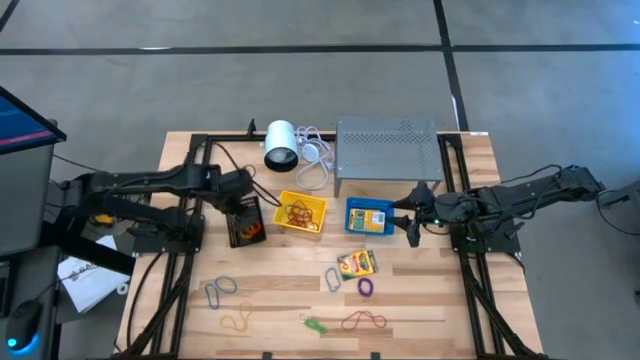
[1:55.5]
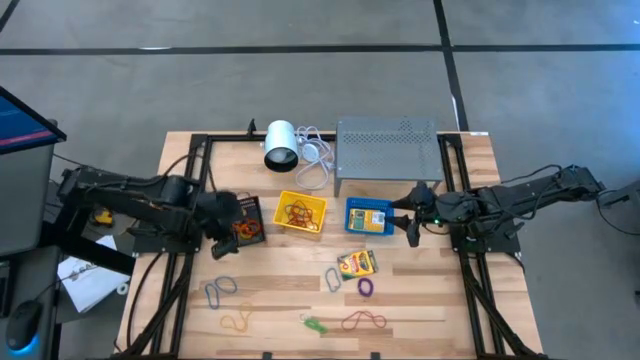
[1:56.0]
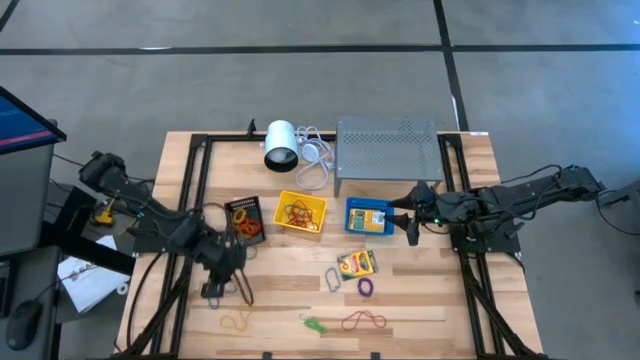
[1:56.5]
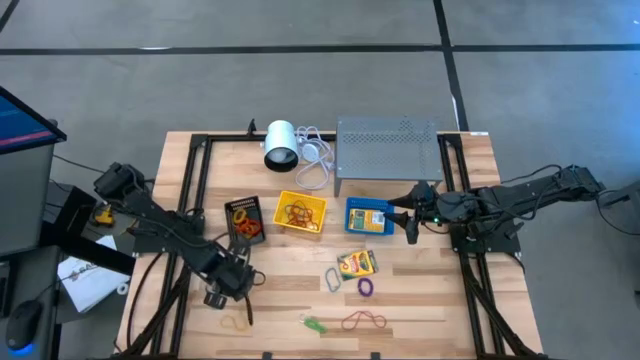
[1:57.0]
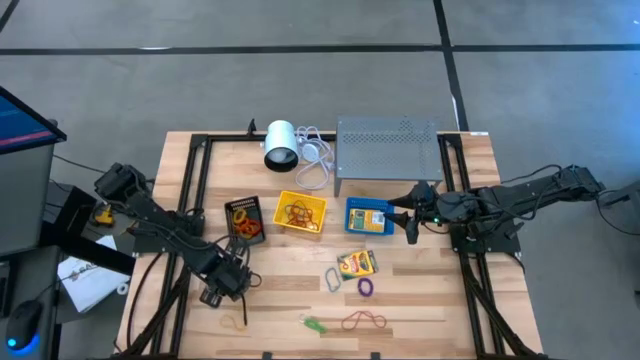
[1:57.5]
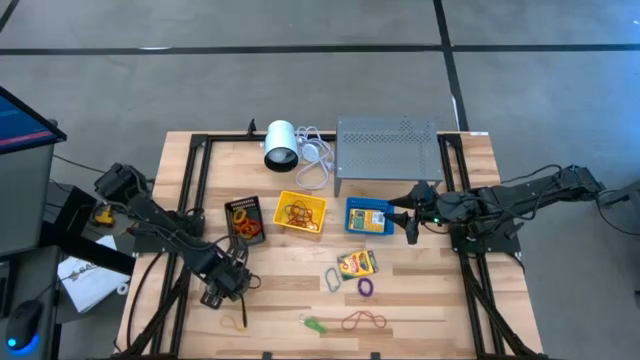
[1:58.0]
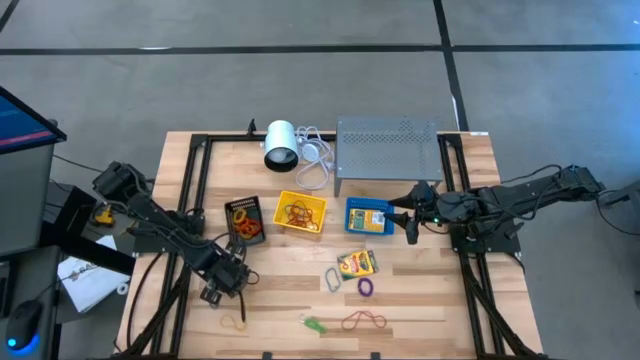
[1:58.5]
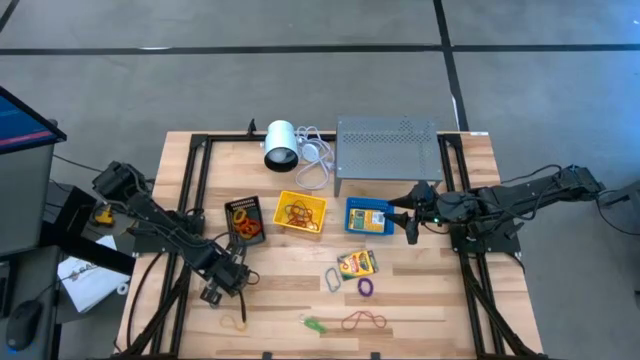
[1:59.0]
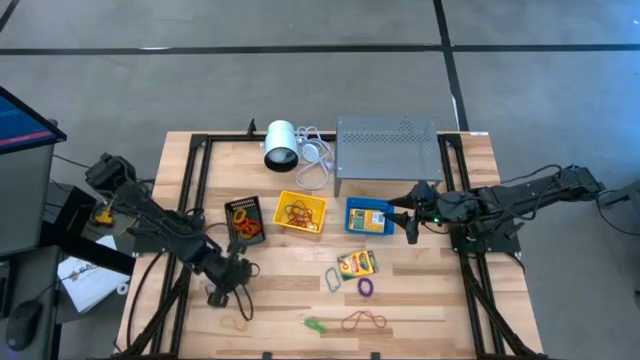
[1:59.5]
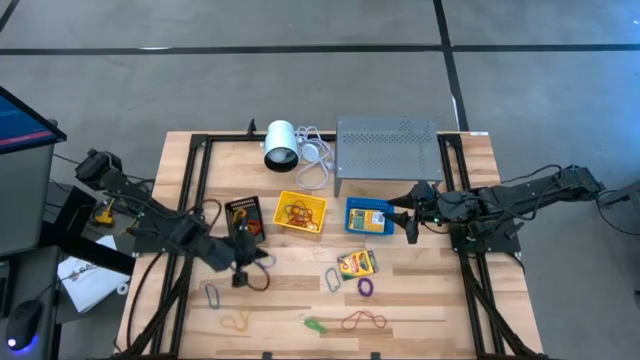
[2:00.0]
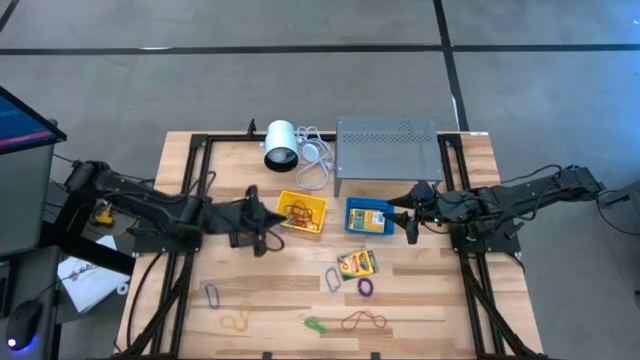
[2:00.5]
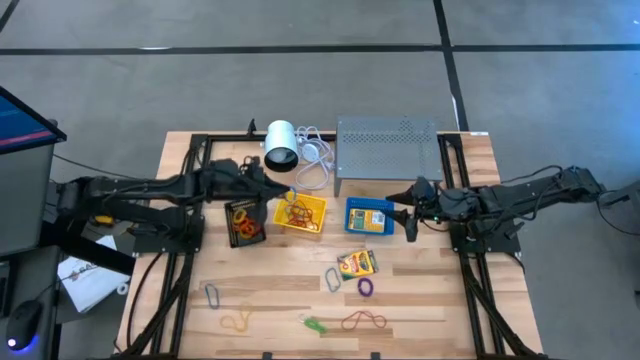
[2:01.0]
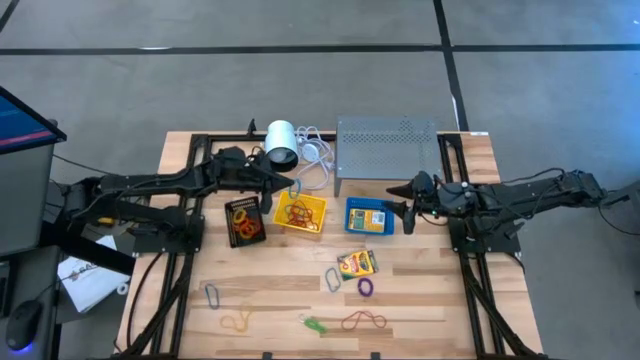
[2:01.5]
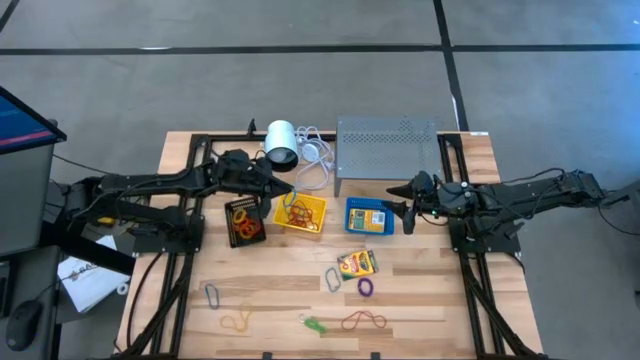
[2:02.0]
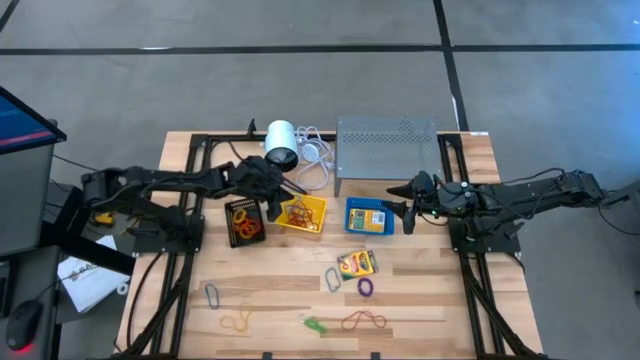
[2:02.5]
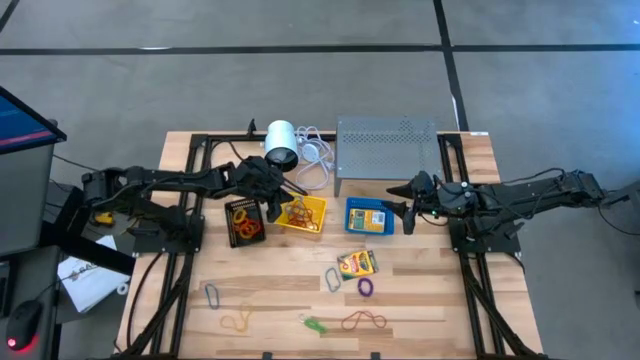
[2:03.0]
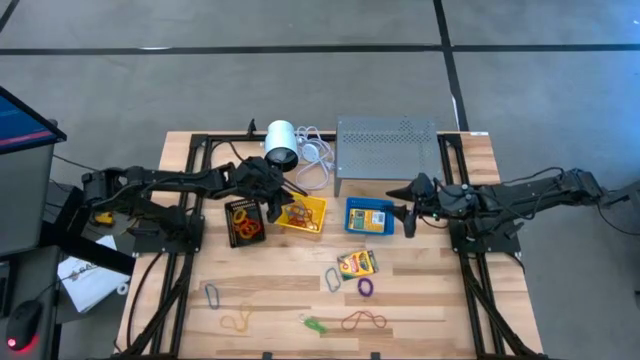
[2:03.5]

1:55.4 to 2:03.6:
Task: Pick & Place Office Desk Supplies
Put the blue rubber band into the yellow bin

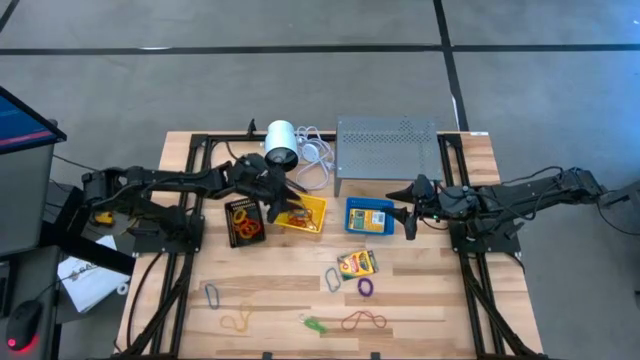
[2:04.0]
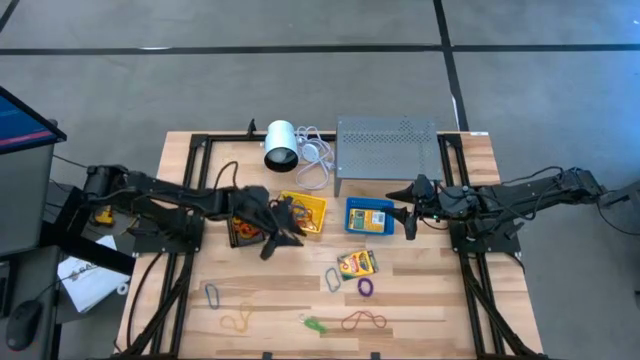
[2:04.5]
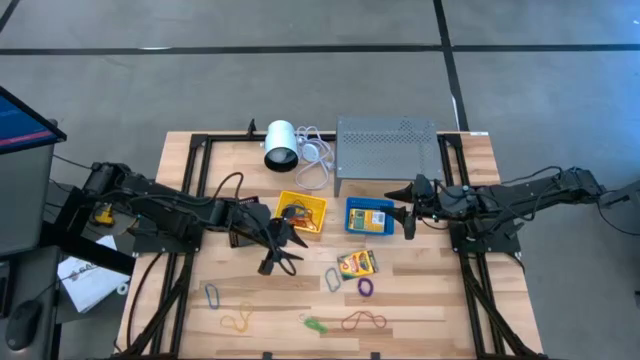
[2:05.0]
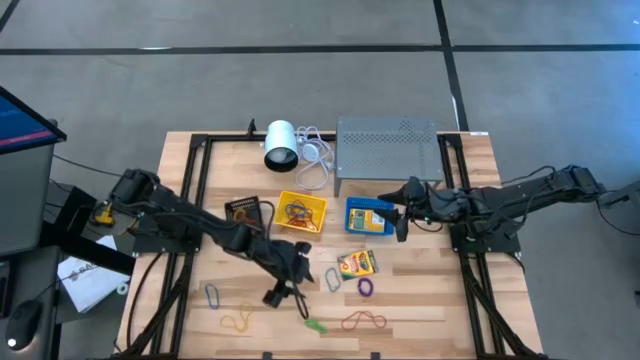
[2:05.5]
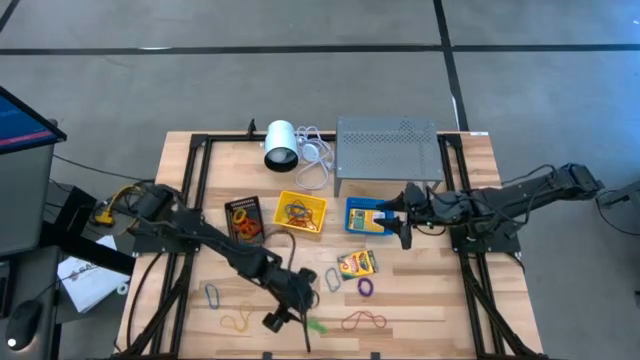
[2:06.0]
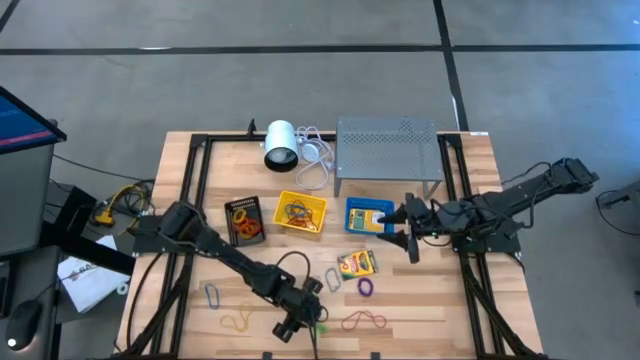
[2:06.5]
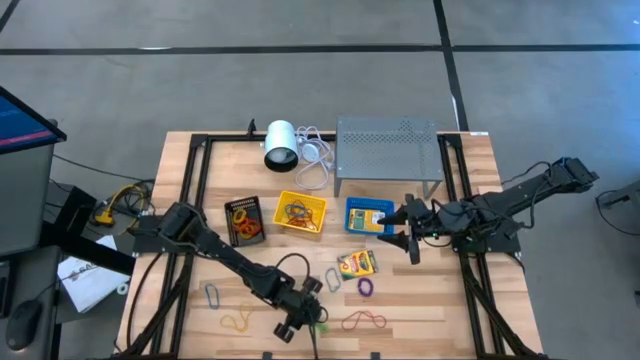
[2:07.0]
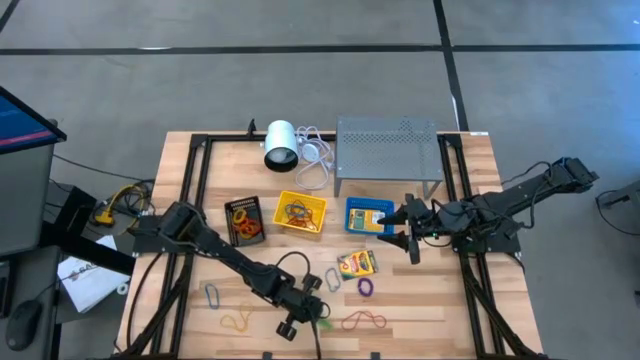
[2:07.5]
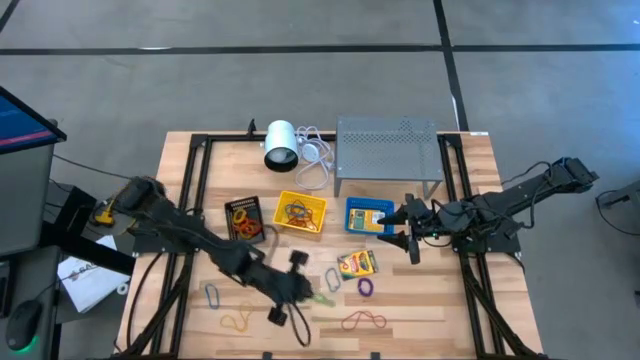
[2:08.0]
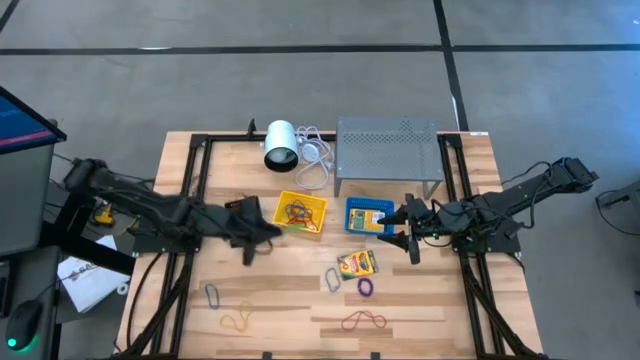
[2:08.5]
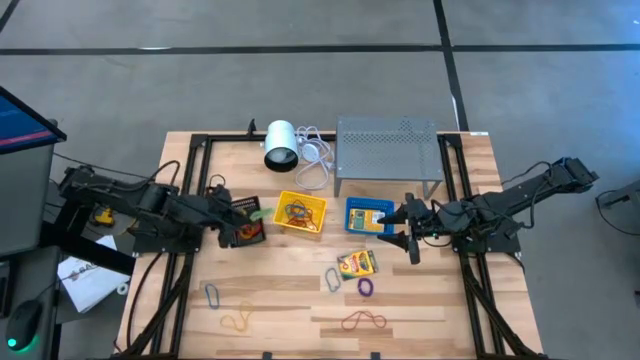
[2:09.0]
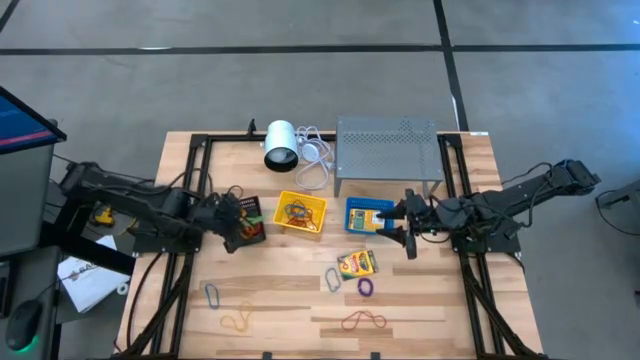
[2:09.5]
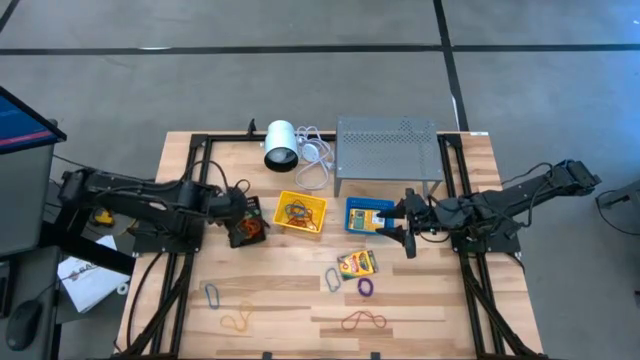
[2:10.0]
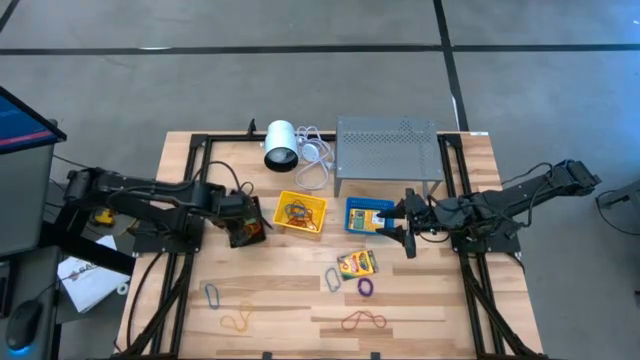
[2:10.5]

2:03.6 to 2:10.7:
Put the green spring keychain into the black bin

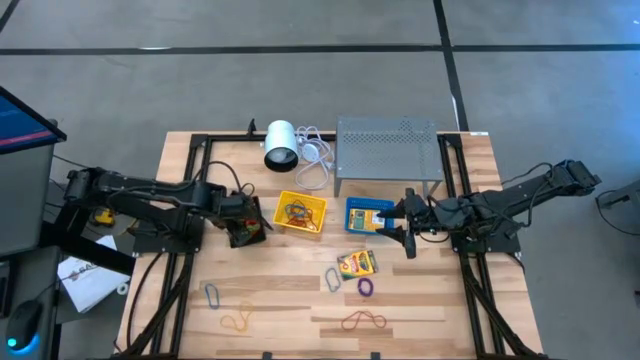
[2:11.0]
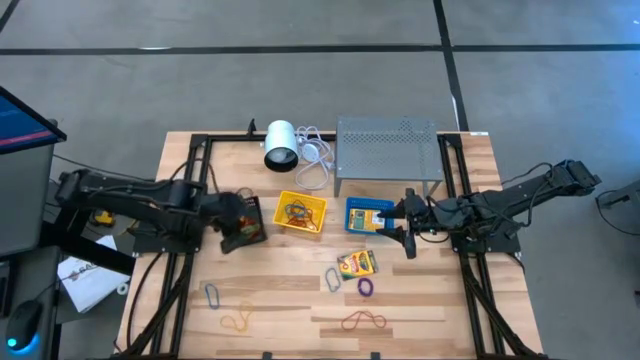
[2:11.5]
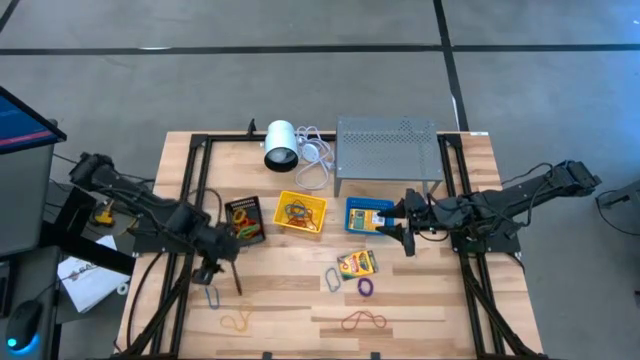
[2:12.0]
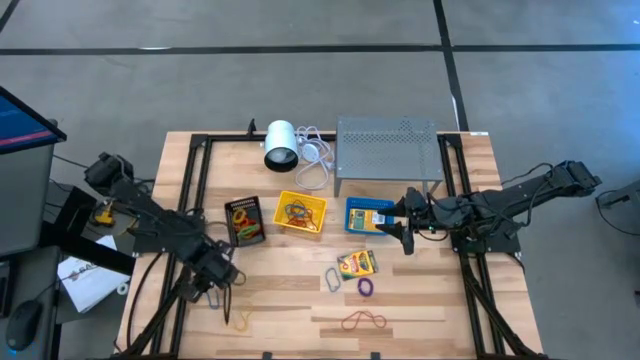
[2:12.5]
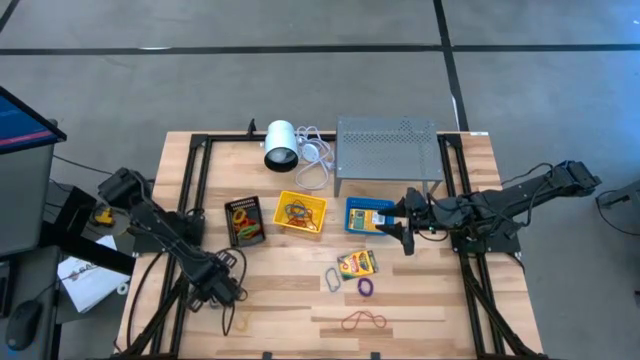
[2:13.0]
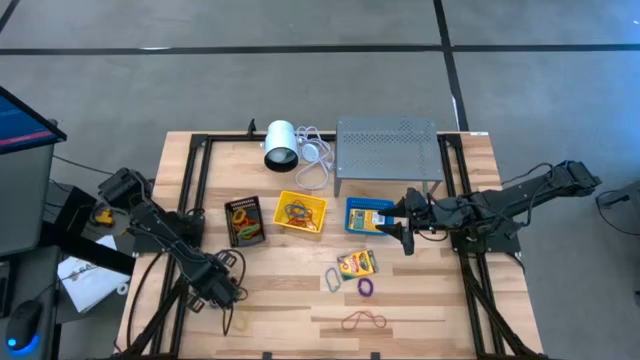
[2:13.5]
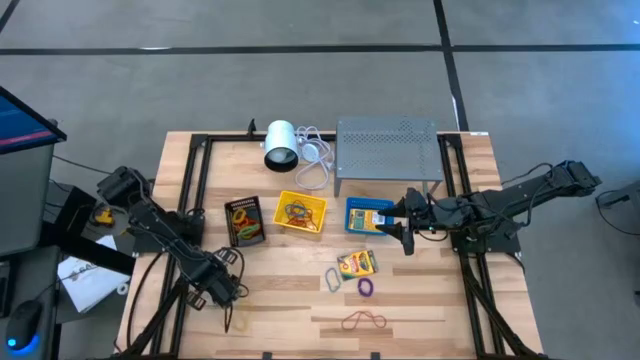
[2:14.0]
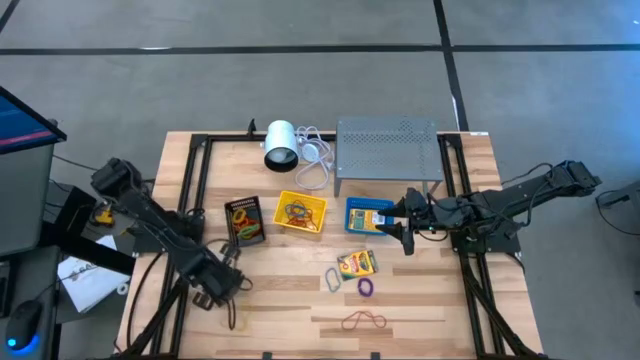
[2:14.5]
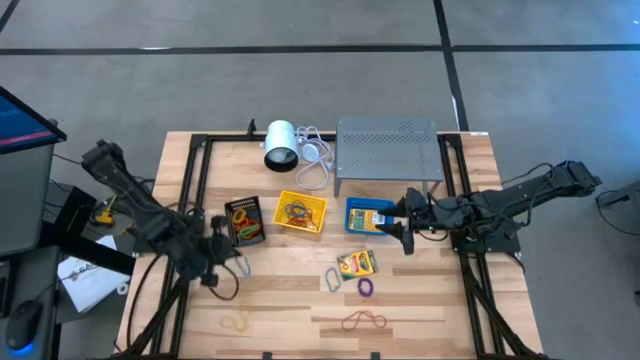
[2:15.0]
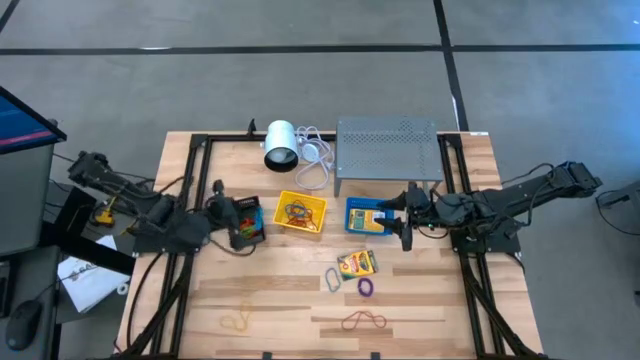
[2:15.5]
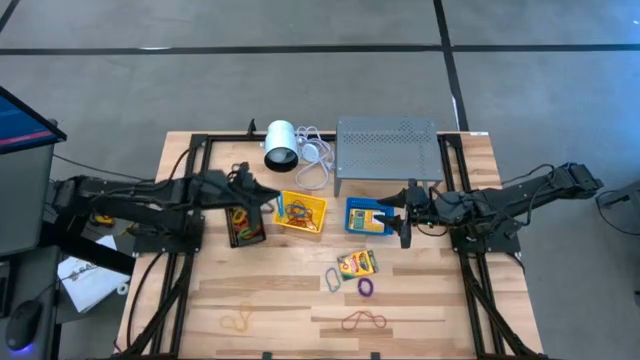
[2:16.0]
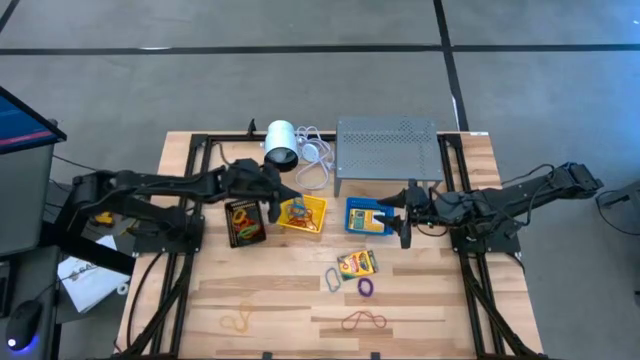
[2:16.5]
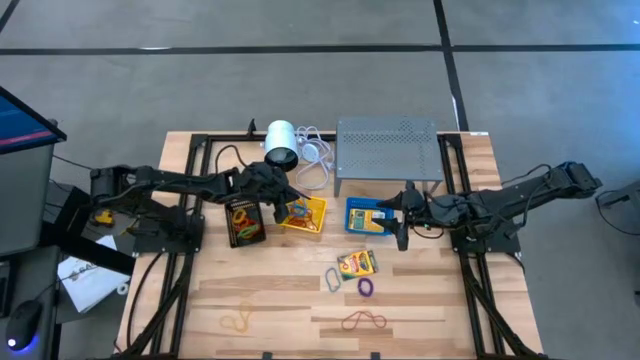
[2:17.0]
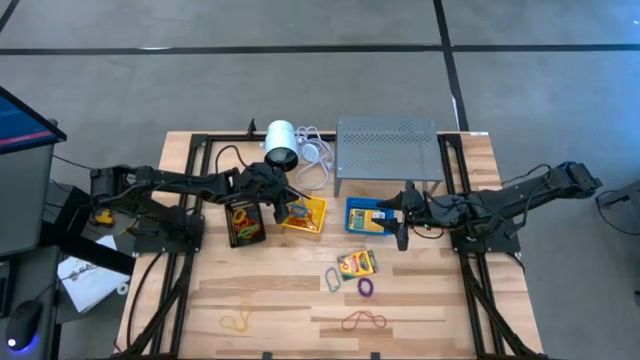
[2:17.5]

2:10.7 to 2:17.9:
Put the blue rubber band into the yellow bin
